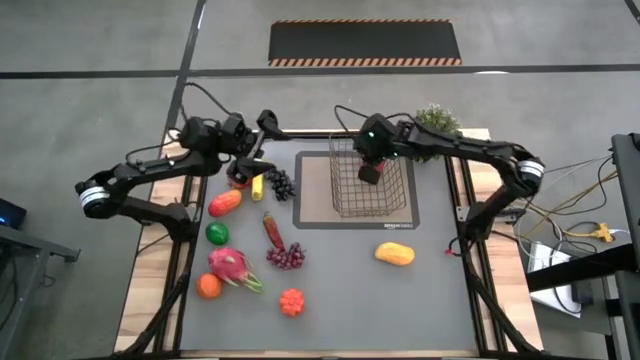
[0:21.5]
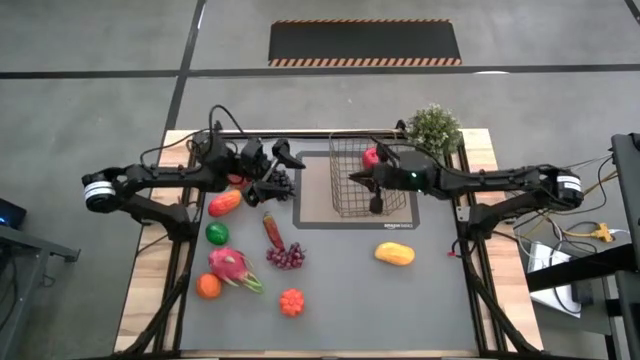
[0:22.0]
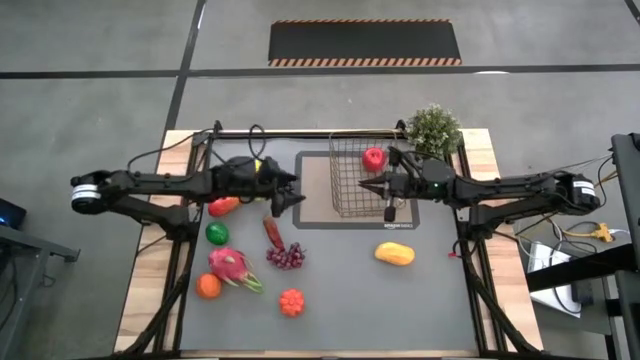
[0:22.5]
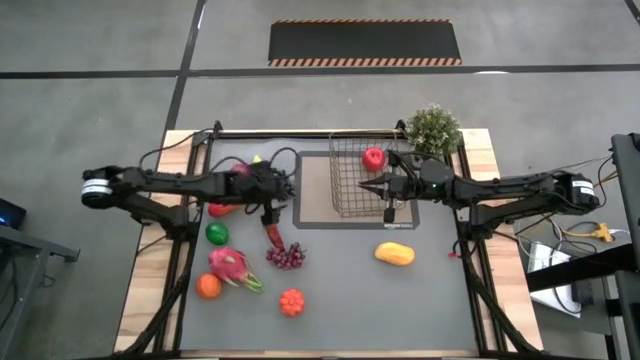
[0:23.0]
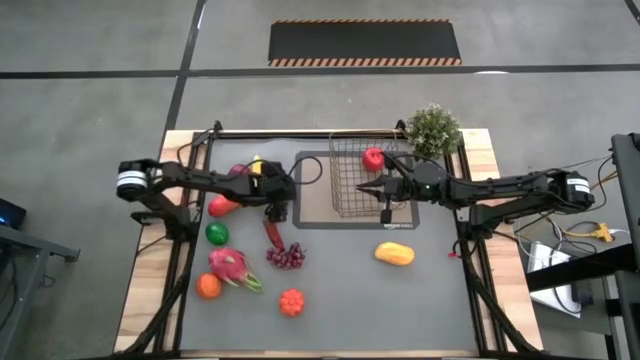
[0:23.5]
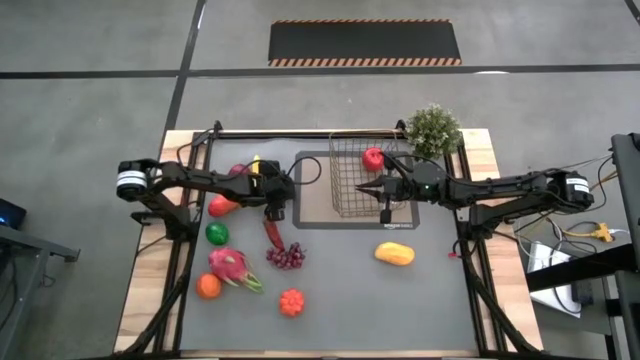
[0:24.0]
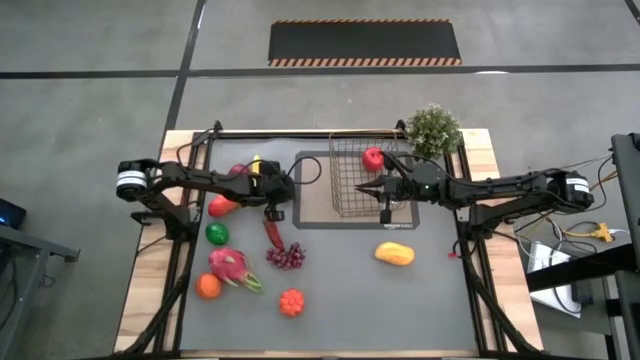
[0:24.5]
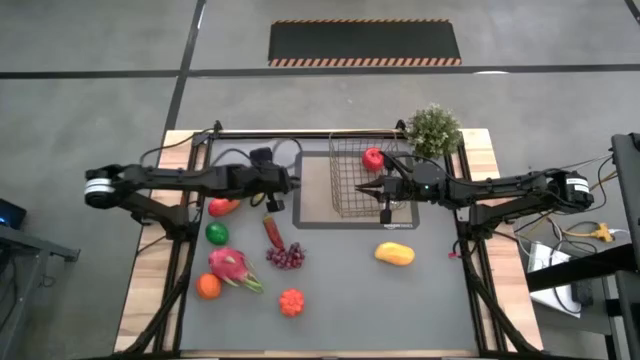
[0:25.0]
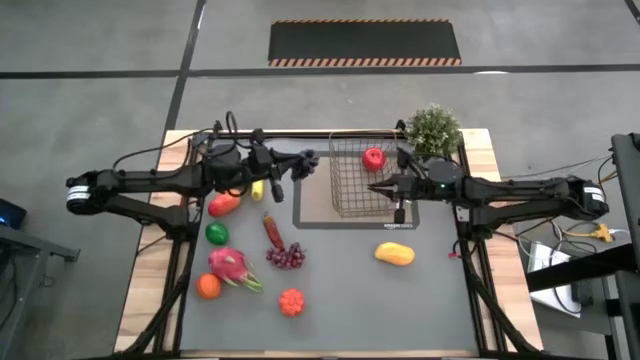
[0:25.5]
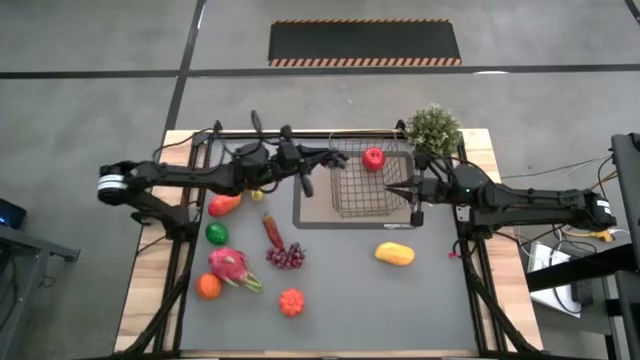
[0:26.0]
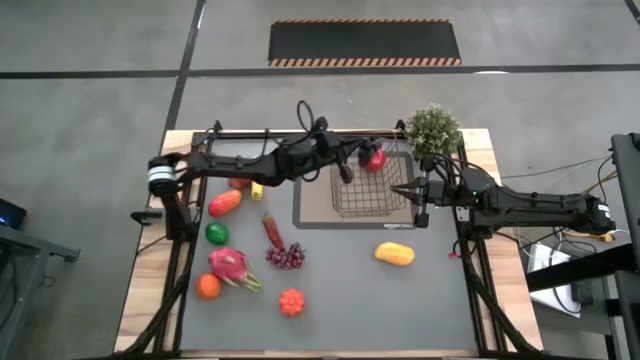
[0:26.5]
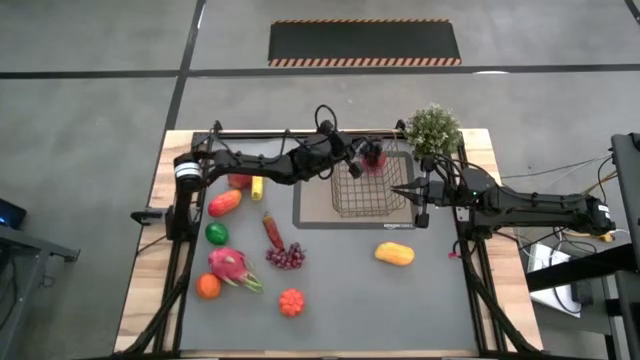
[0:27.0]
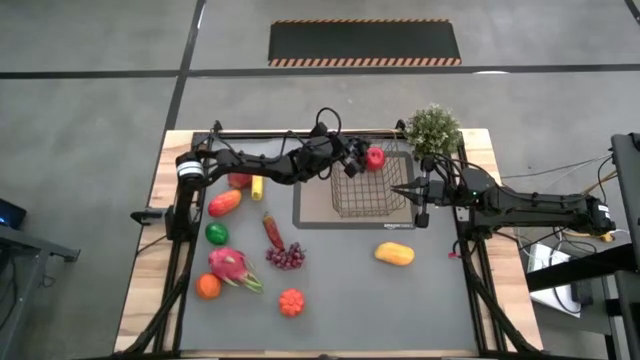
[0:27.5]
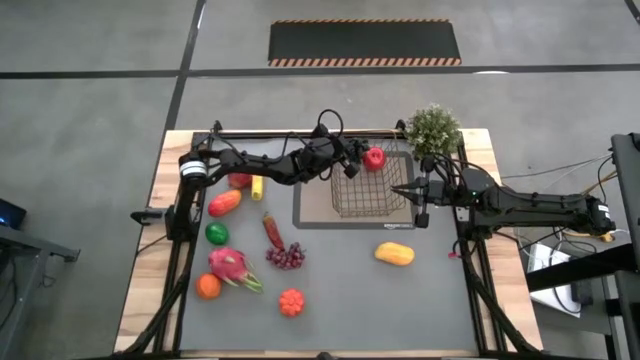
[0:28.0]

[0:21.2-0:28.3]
Task: Build produce basket
Put the black grapes into the wire basket

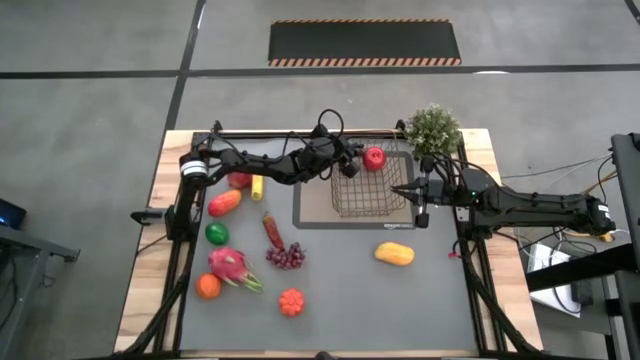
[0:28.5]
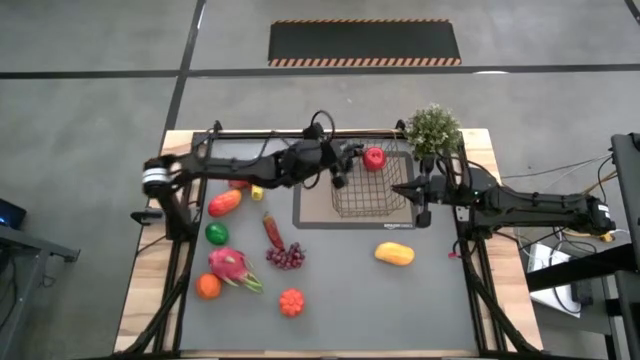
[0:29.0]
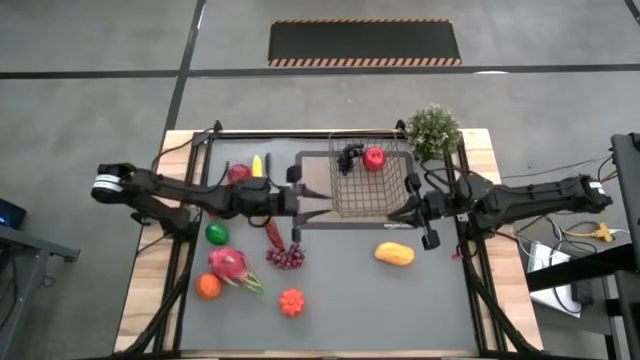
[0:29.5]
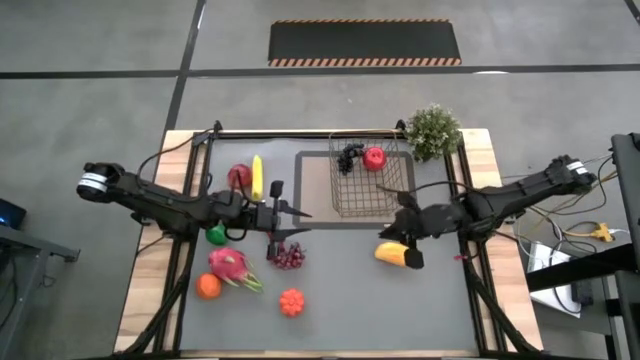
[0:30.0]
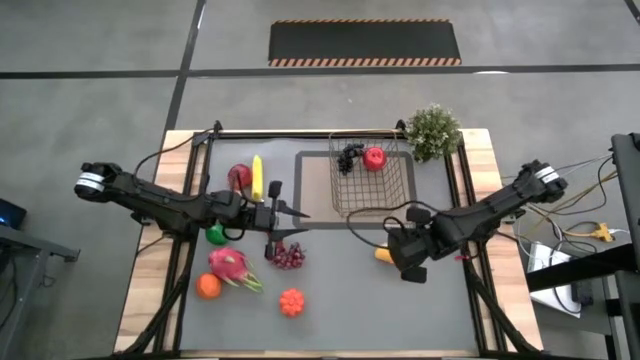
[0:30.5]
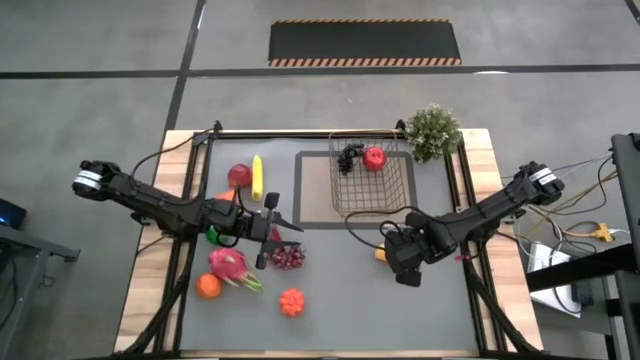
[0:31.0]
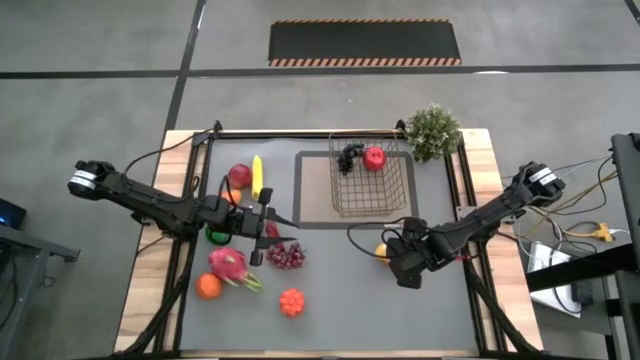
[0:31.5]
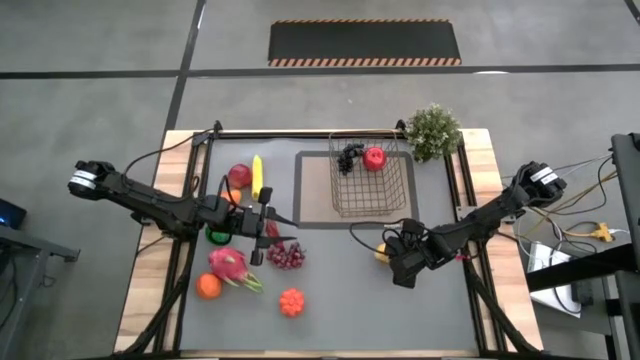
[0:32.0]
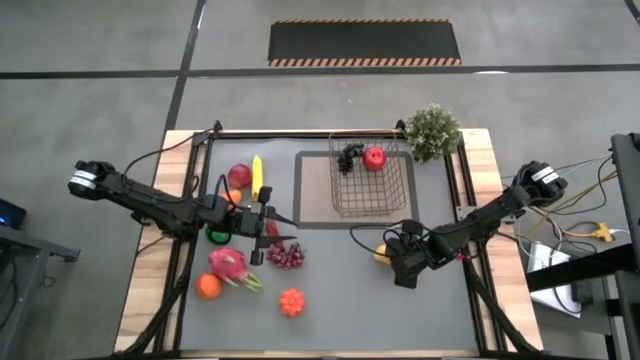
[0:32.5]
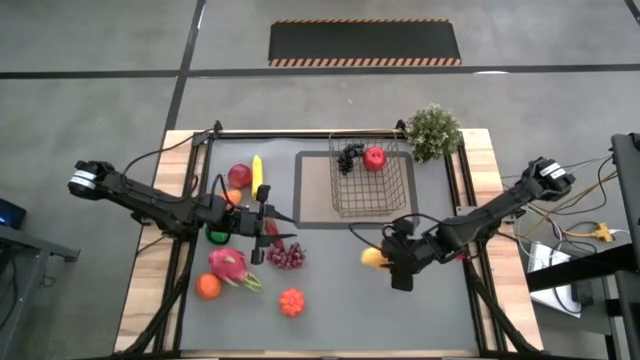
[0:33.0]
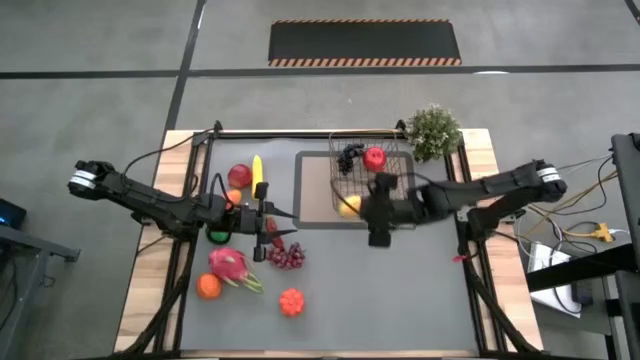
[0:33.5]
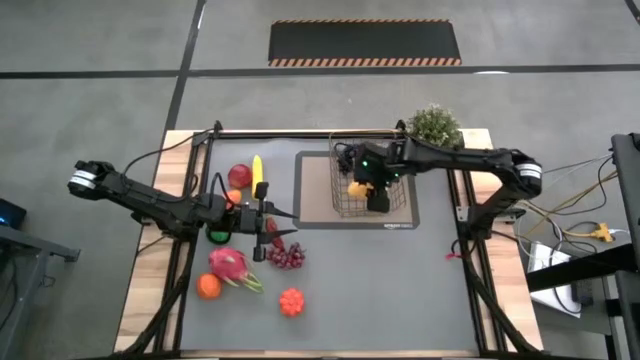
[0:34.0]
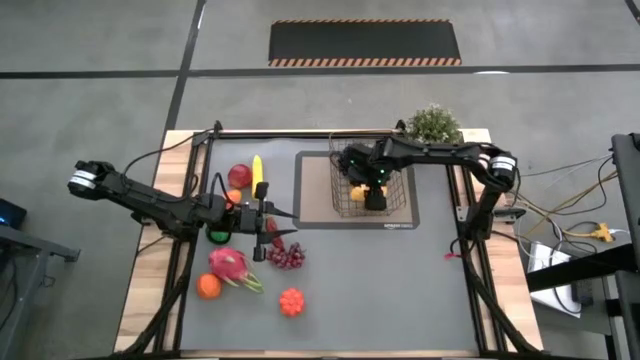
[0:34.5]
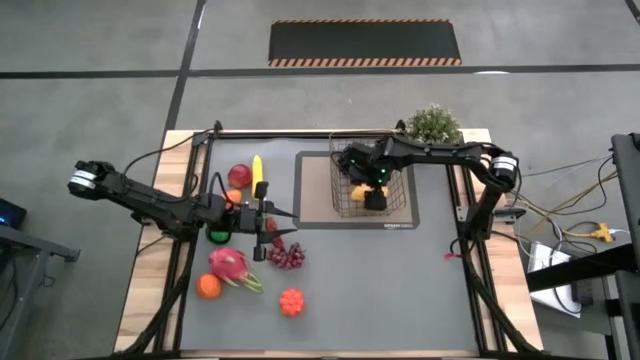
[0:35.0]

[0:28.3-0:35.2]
Put the right mango into the wire basket

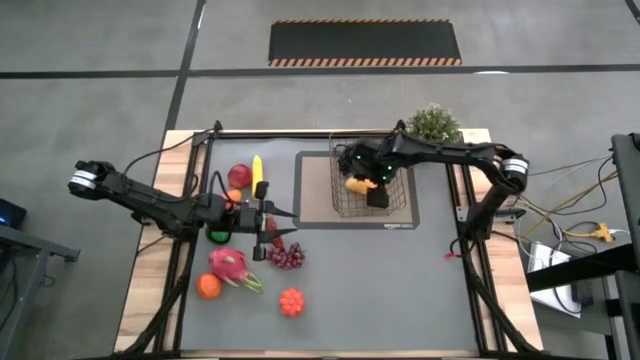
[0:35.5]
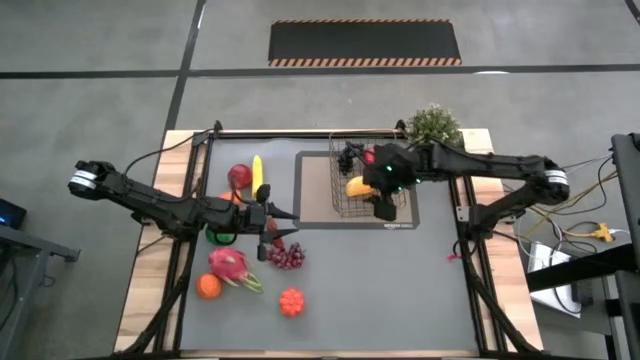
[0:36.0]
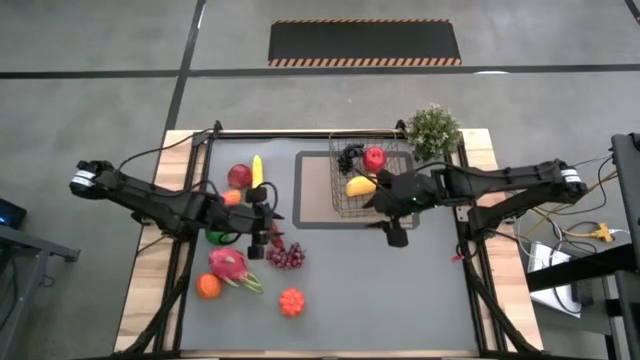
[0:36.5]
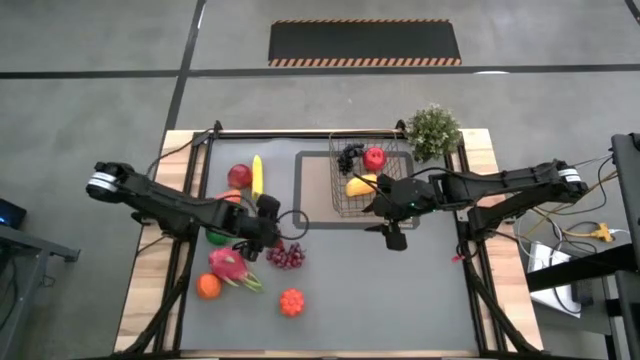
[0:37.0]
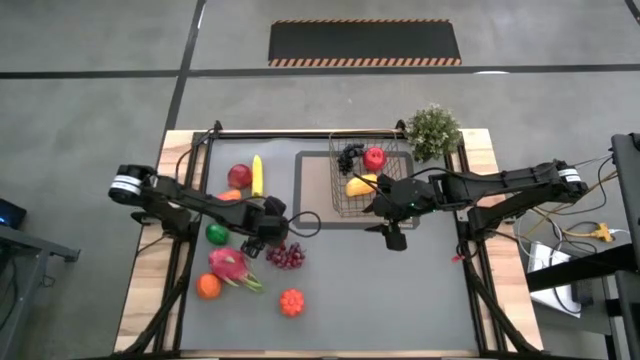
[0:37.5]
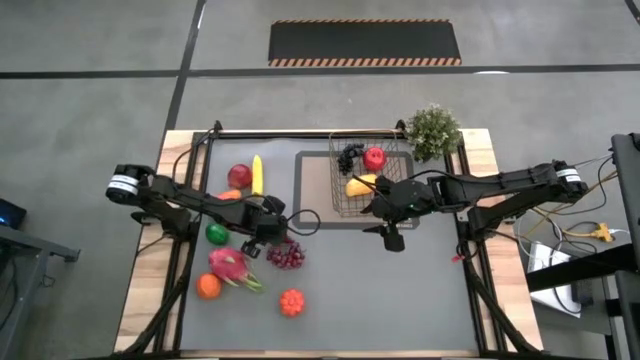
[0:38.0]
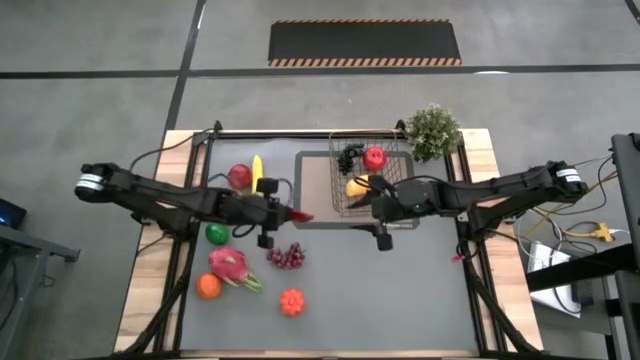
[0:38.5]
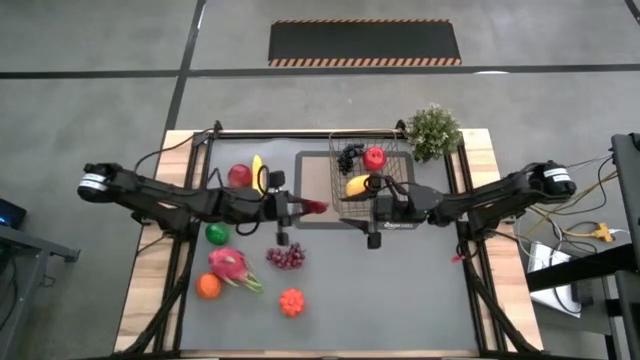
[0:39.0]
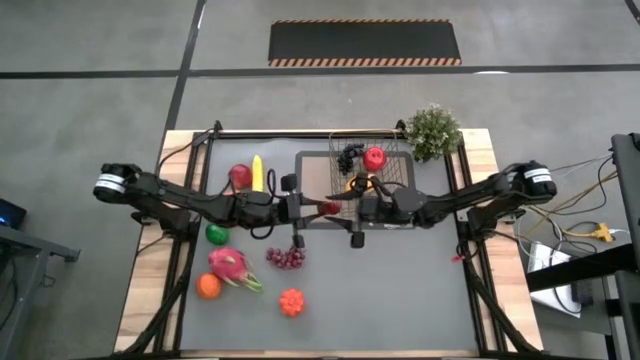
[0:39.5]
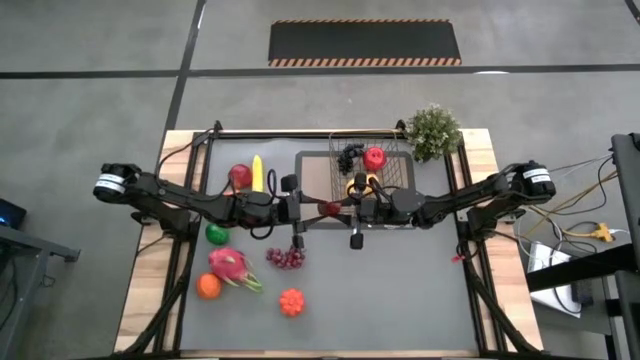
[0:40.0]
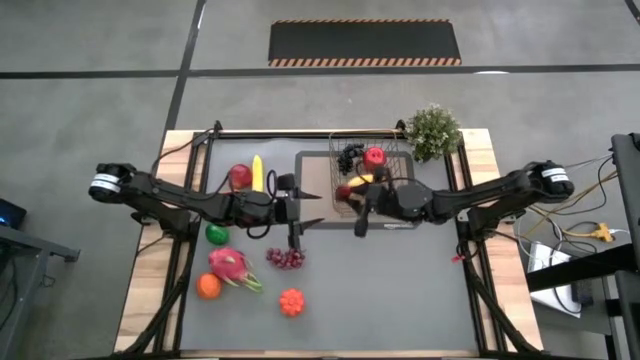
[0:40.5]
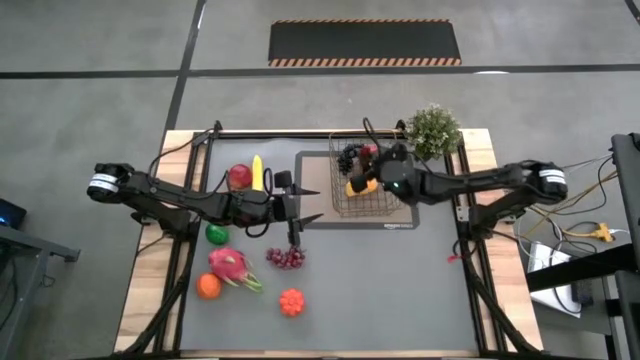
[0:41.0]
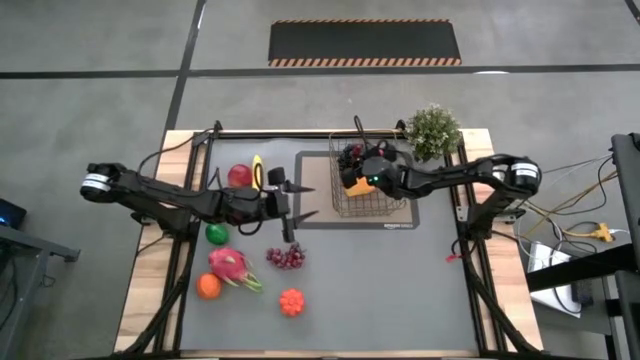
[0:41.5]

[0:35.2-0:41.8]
Put the chili pepper into the wire basket
